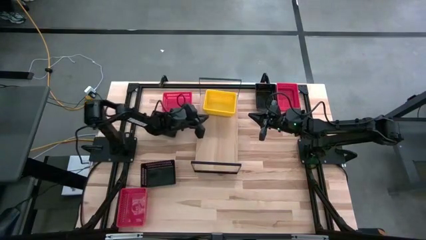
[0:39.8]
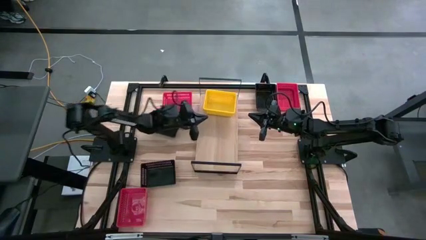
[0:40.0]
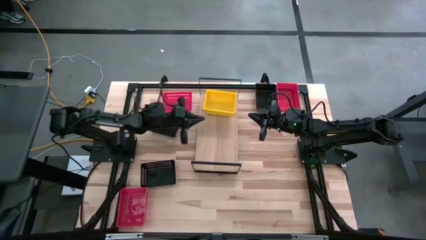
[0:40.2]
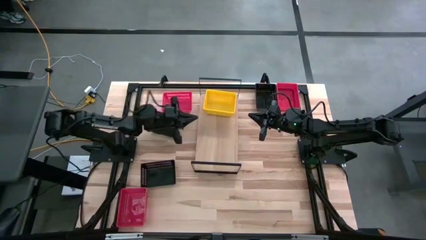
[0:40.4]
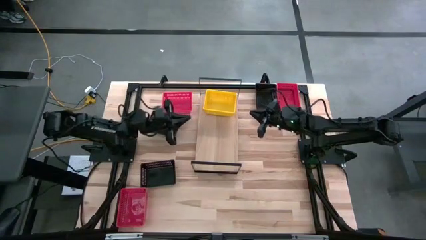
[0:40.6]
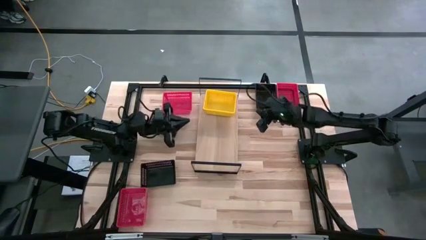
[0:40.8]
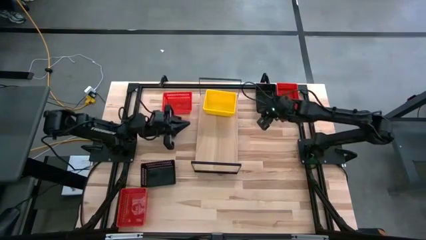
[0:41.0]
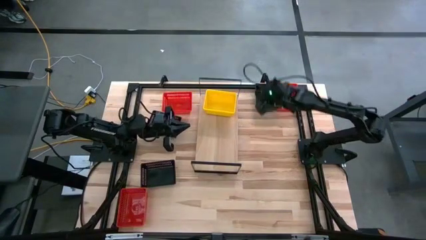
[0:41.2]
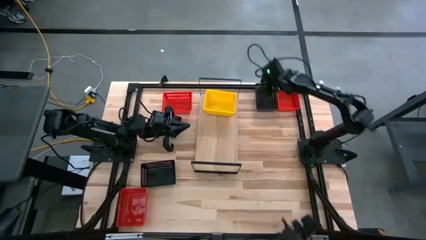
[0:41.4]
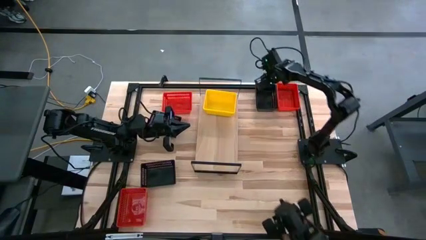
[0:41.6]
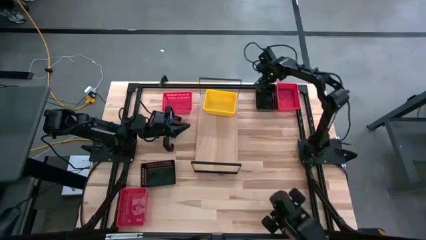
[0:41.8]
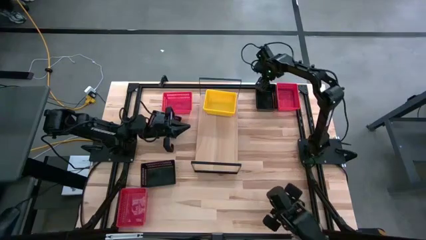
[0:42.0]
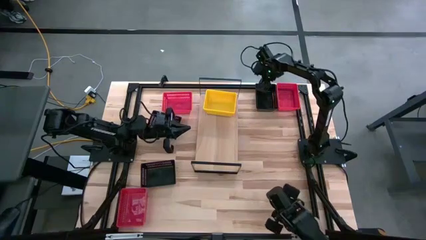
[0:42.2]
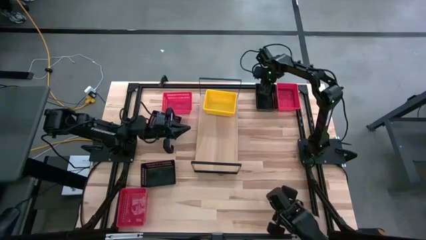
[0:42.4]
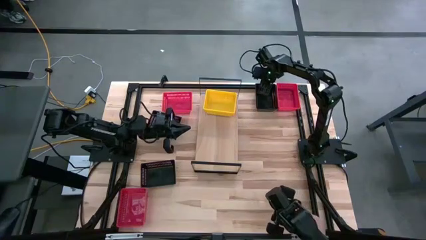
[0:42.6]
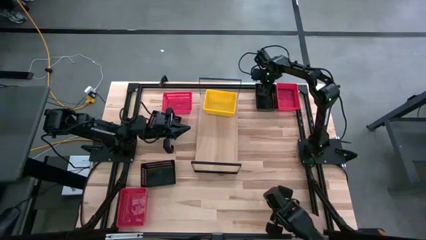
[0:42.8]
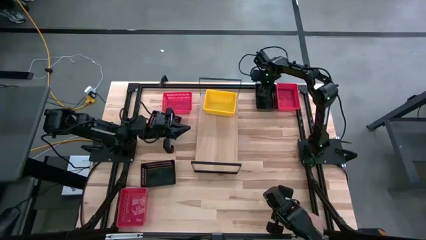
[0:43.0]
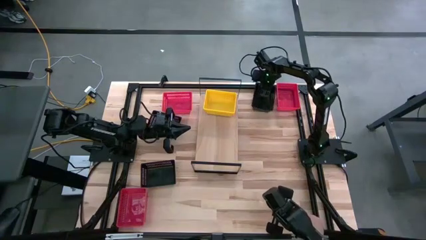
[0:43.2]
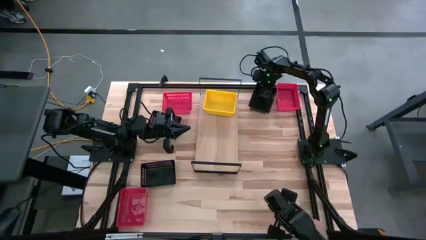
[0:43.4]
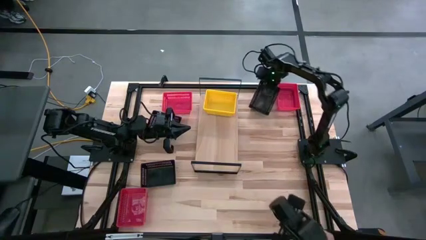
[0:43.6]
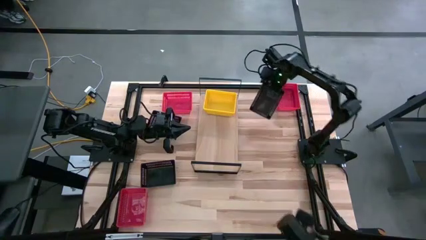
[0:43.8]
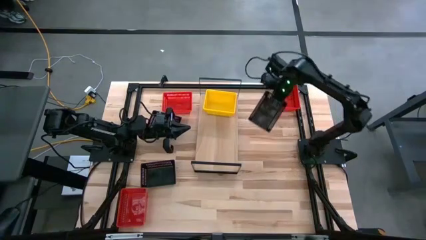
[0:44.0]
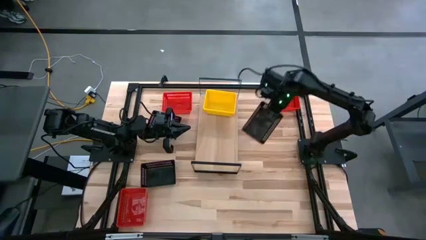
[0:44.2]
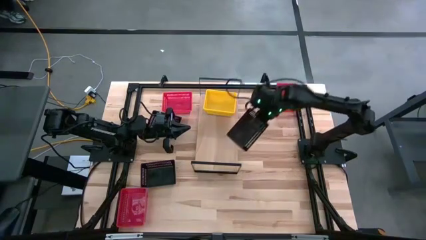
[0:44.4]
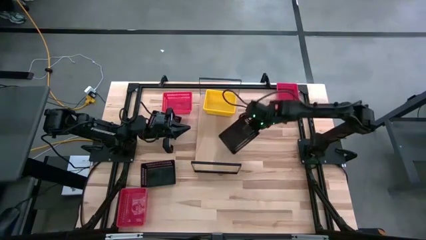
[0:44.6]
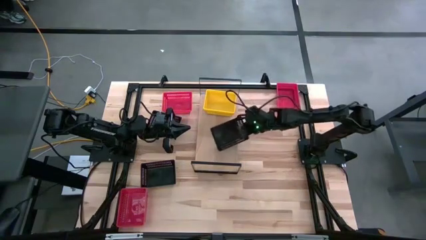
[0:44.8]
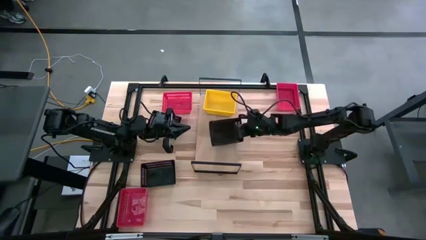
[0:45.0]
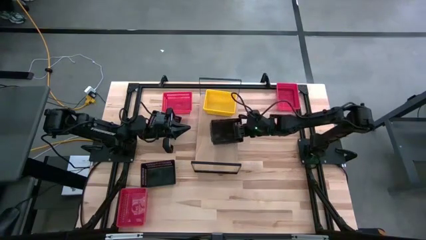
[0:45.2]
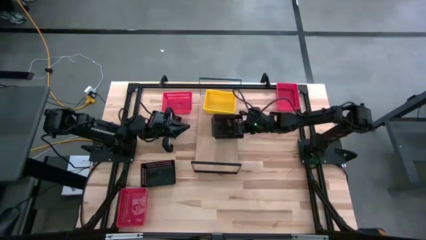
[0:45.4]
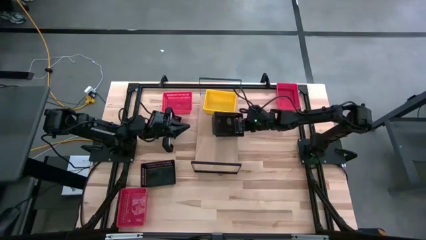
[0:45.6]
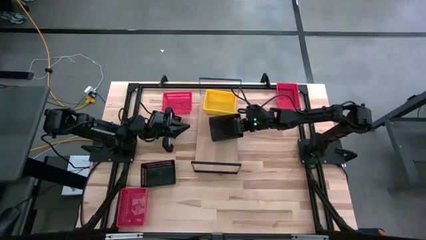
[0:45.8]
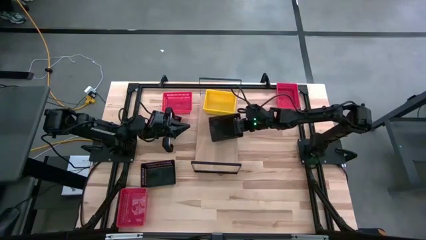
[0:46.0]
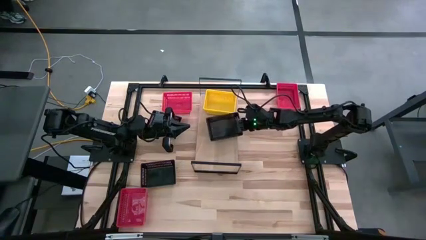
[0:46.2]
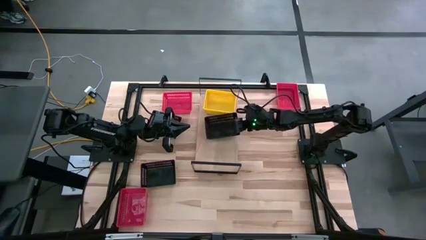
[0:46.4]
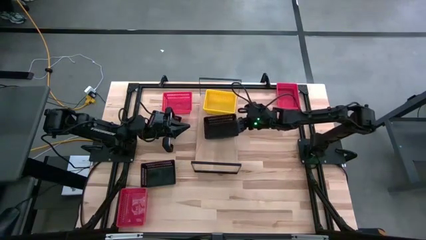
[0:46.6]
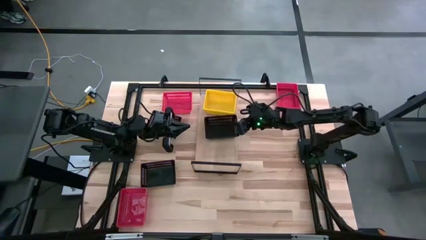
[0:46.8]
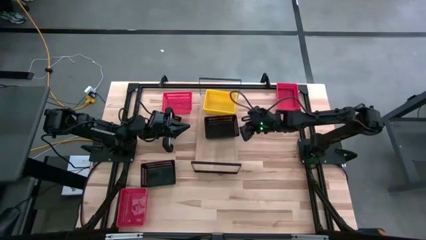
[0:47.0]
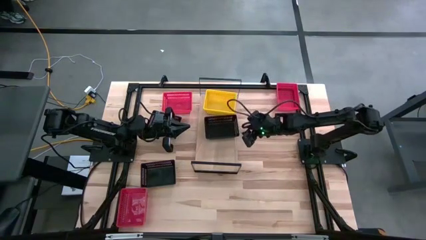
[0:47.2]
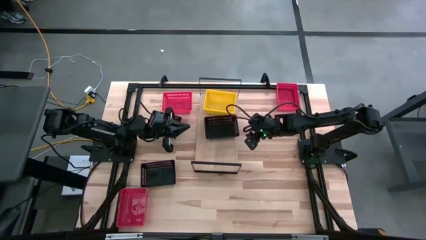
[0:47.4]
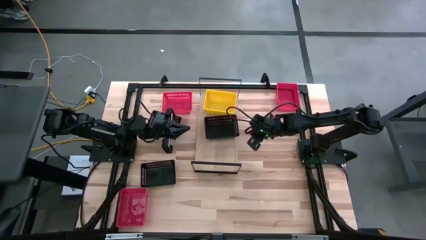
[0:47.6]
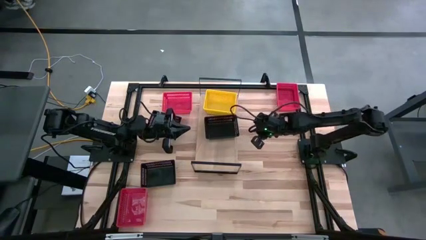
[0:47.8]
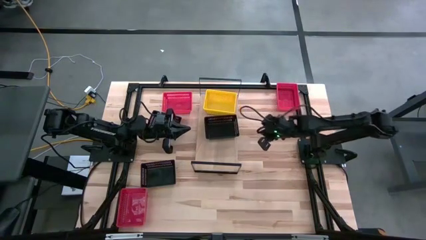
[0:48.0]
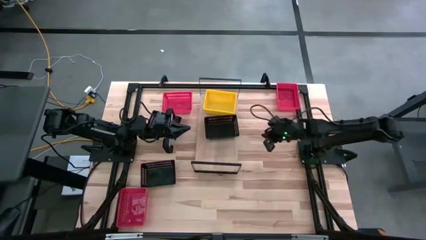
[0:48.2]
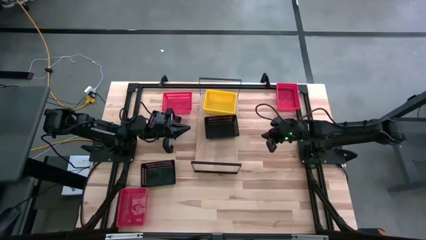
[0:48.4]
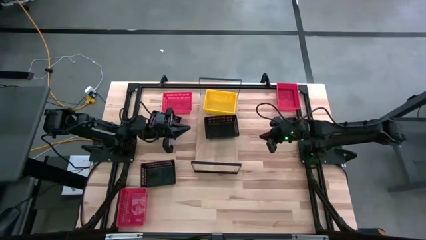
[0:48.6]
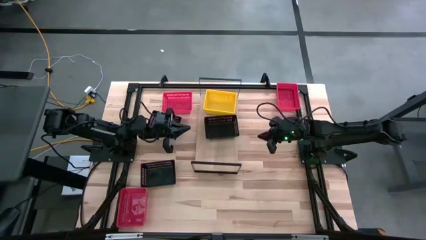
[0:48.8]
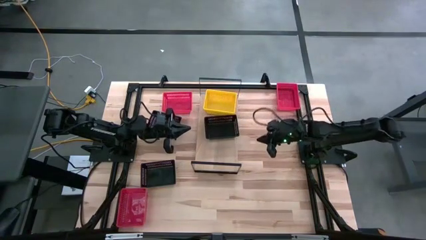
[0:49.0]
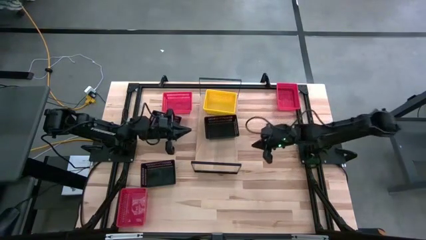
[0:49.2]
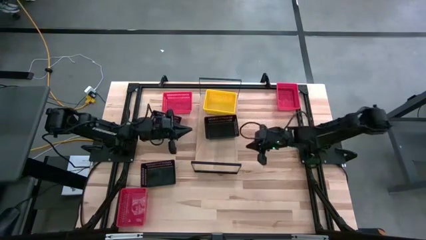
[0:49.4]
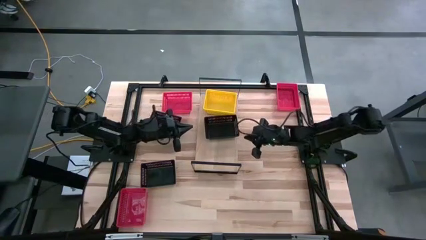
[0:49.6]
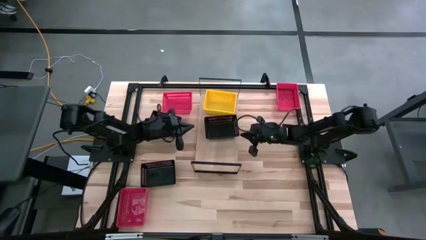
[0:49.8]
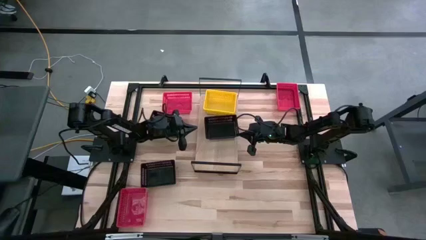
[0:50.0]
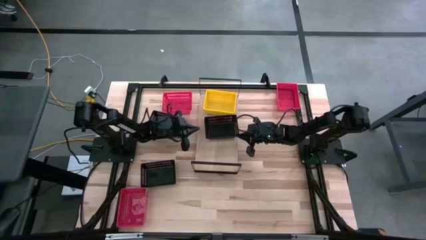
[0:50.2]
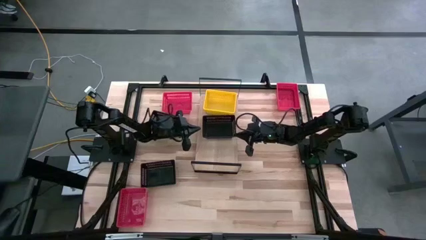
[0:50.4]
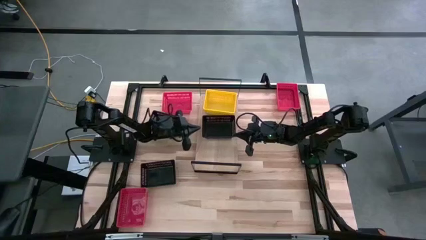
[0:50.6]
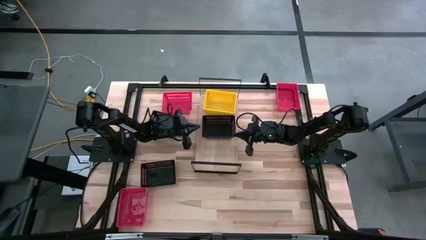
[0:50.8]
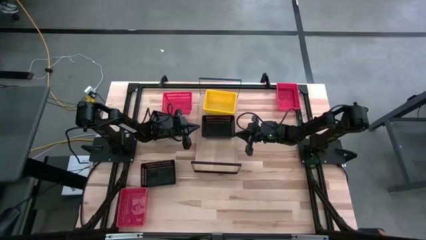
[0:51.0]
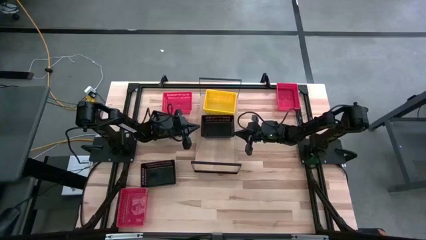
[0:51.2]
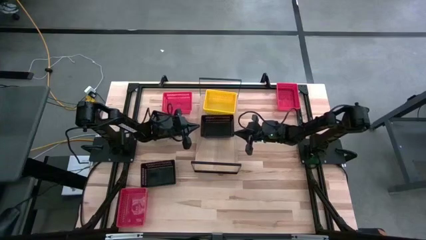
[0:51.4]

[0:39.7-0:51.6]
Task: Stack baskets on shelf by color
Put the top black bin on the shelf

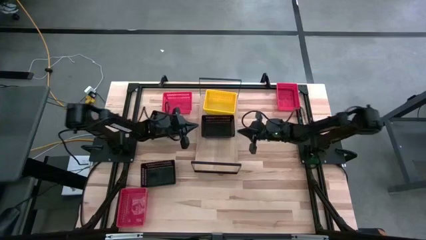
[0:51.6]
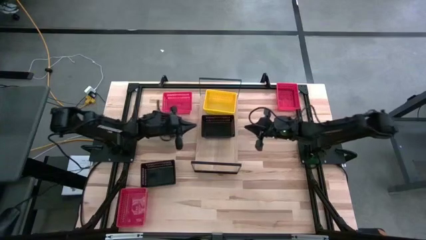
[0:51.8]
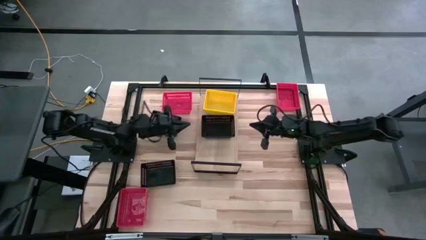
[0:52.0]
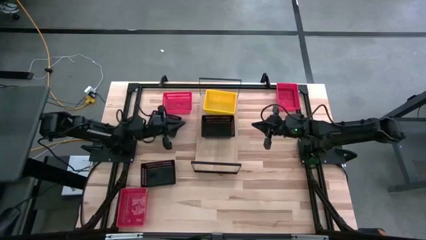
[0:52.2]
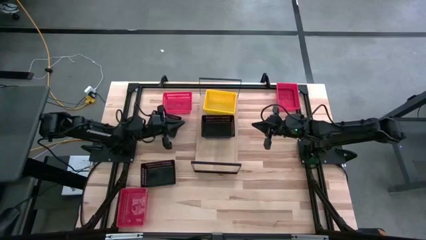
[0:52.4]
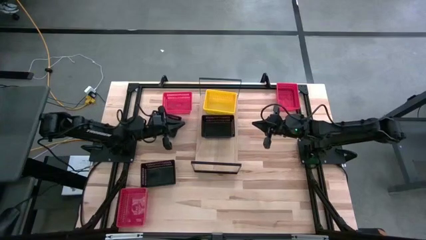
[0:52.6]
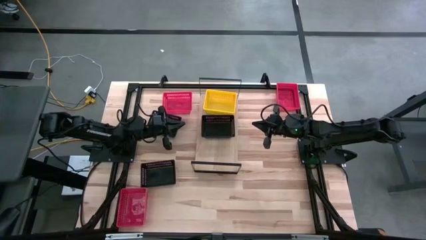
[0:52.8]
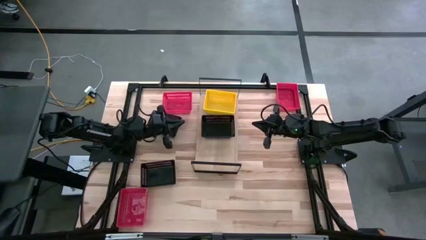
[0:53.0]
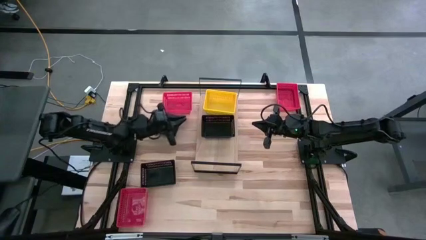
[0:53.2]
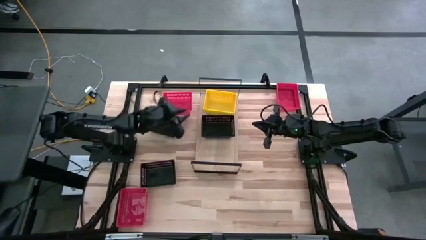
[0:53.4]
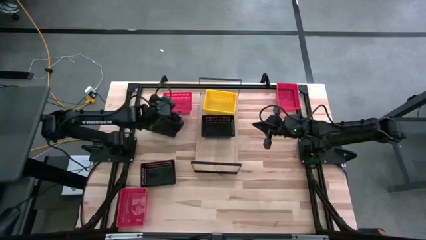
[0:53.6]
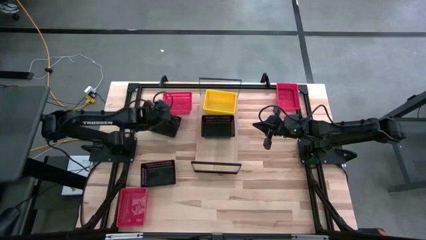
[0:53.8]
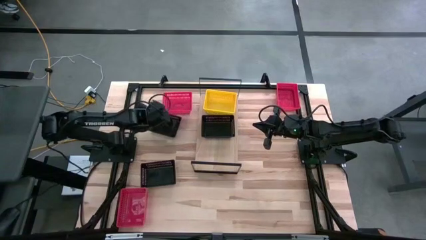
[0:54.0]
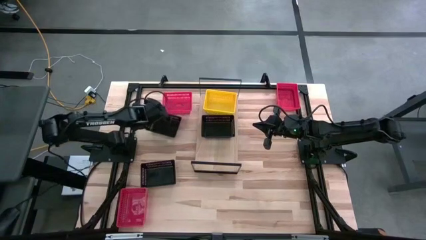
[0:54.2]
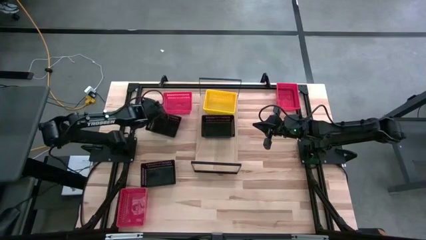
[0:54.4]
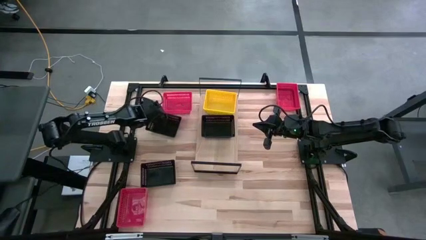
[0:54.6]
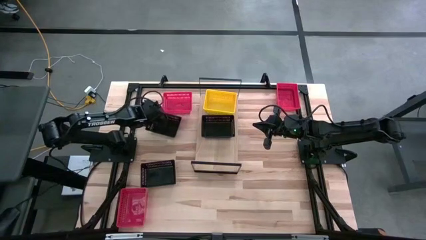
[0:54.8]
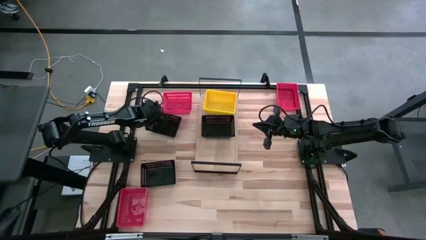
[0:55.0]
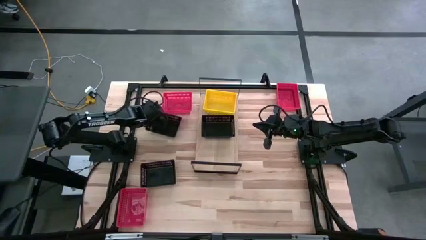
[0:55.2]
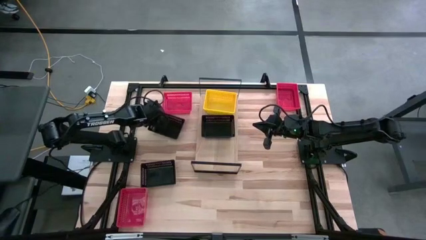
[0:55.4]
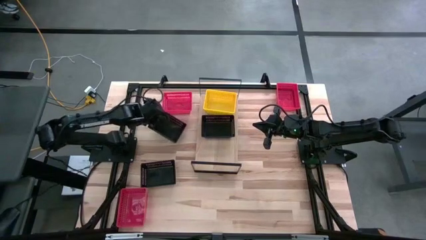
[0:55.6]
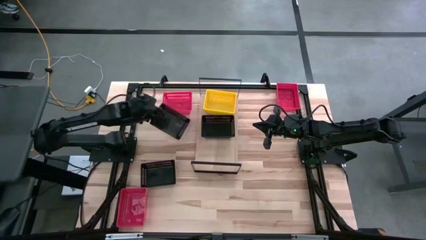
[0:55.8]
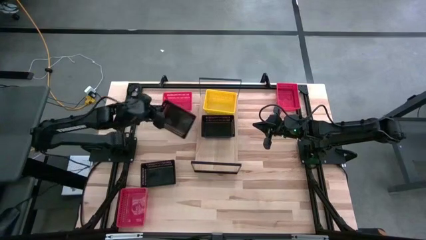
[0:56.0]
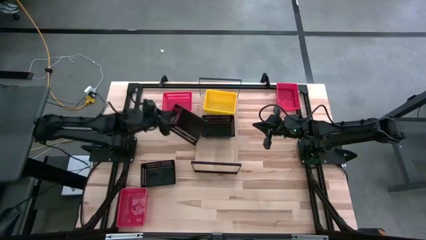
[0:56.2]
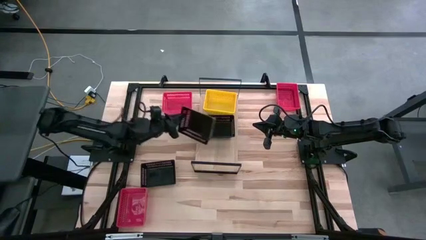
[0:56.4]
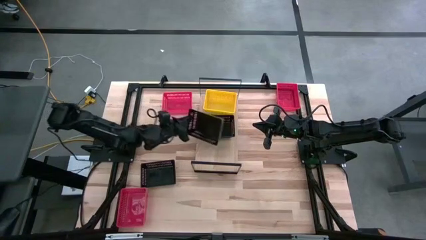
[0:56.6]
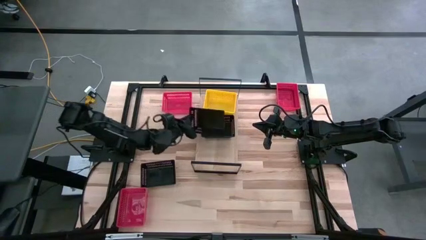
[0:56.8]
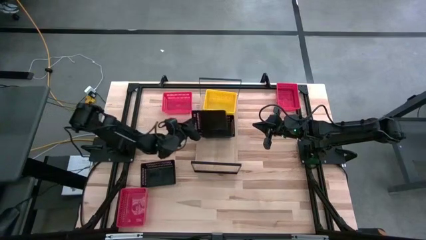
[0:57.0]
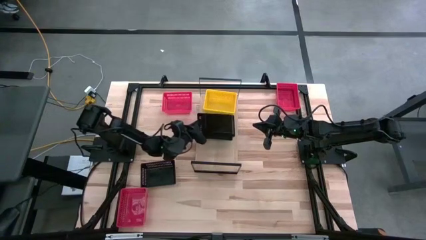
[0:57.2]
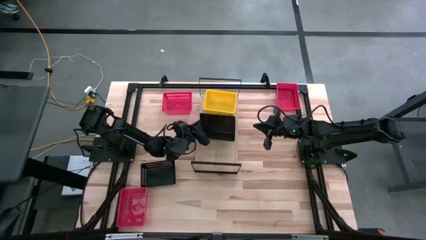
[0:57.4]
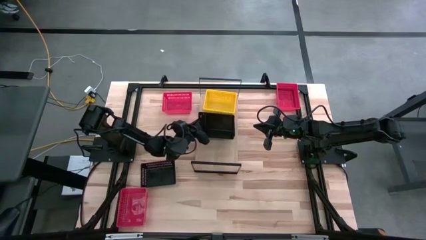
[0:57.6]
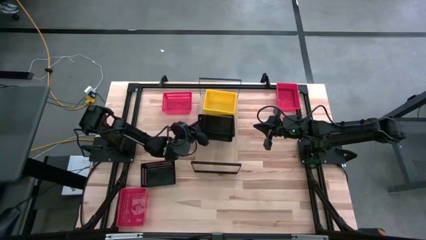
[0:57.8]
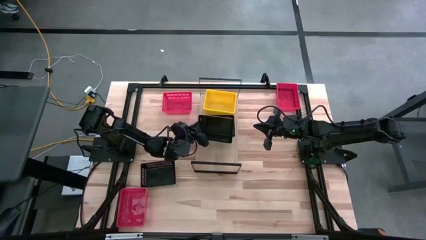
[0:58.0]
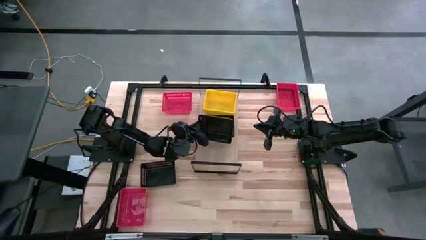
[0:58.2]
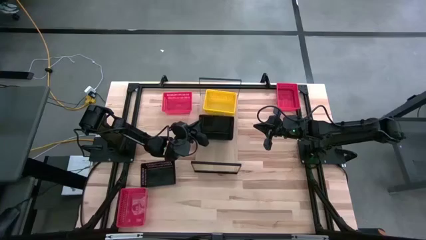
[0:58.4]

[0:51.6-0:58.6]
Stack the top black bin on the black bin on the shelf
